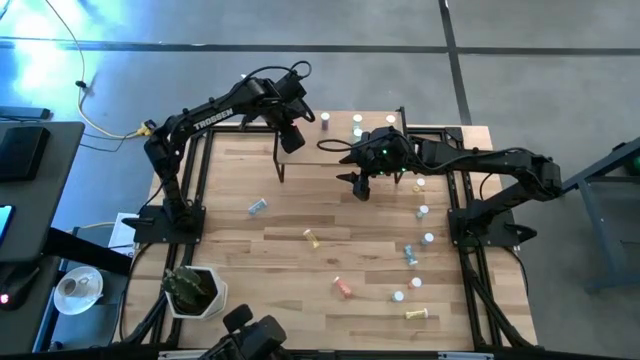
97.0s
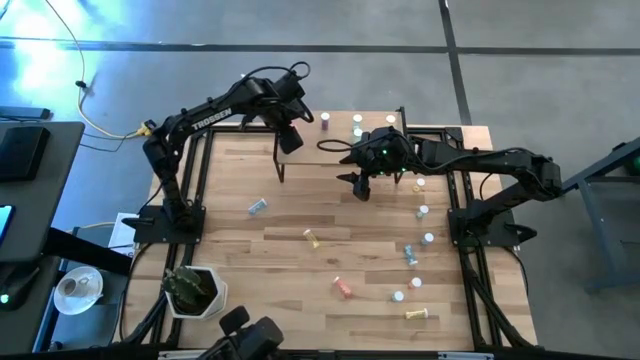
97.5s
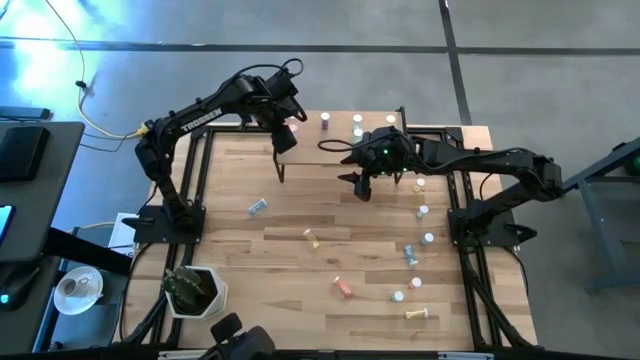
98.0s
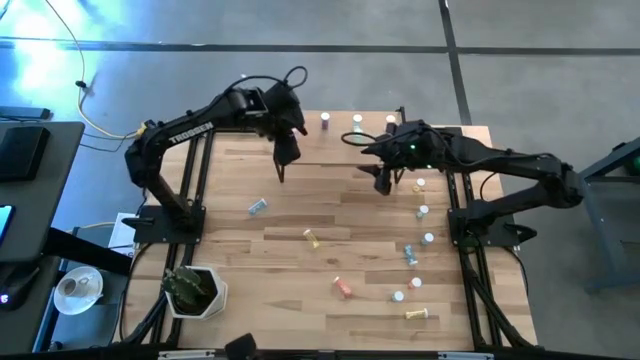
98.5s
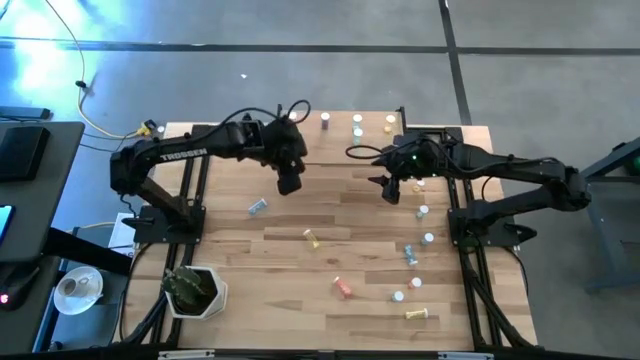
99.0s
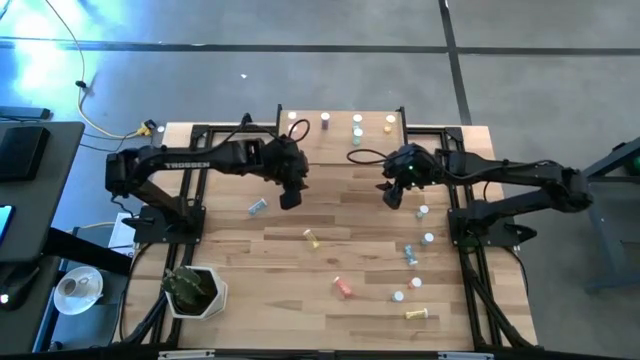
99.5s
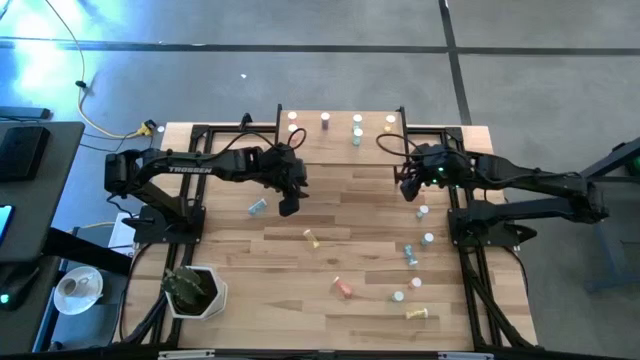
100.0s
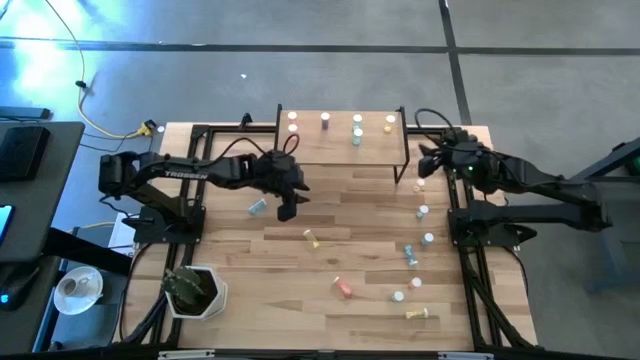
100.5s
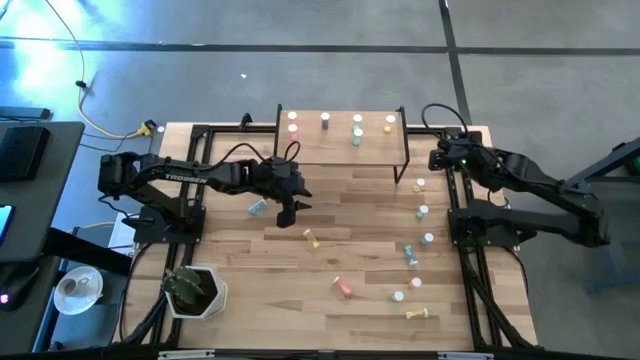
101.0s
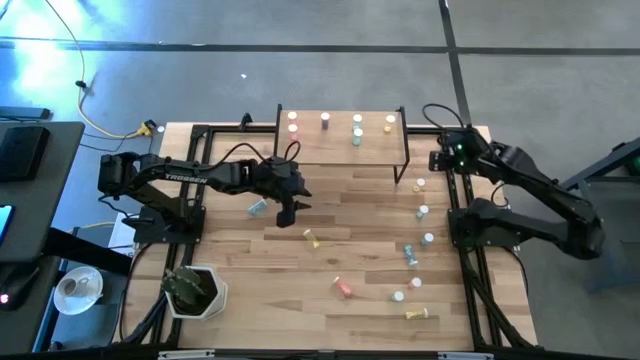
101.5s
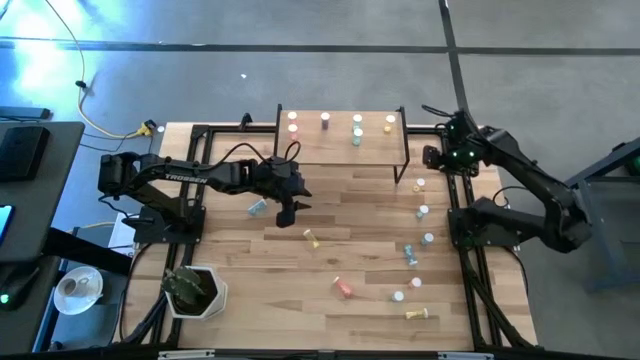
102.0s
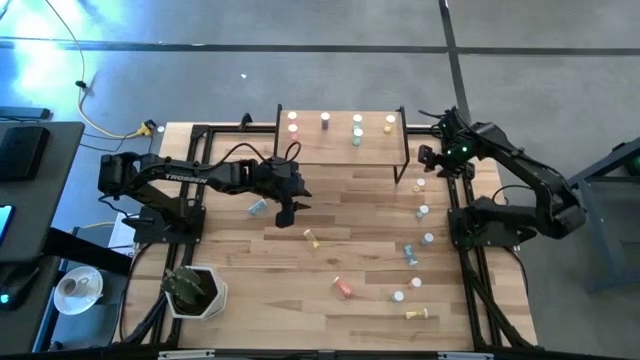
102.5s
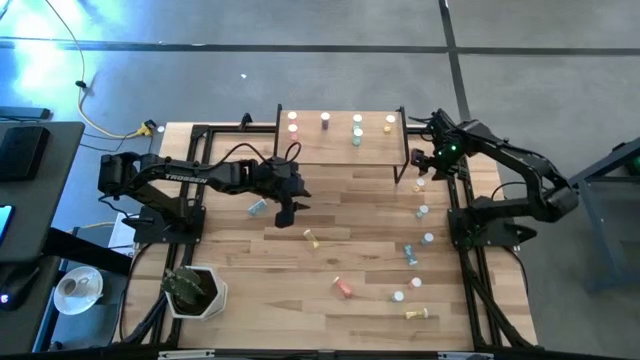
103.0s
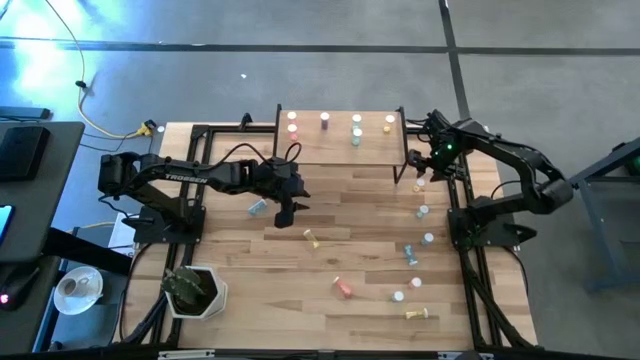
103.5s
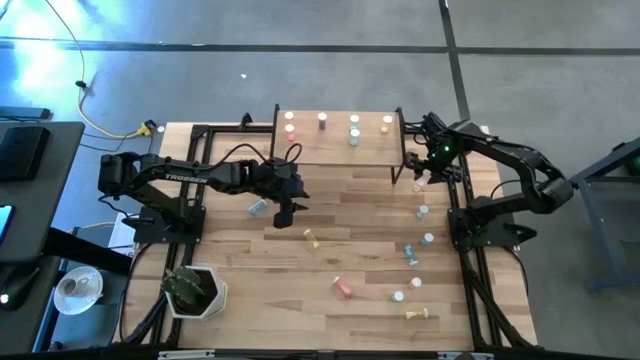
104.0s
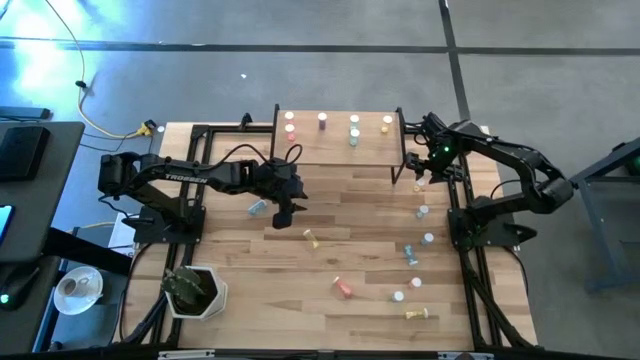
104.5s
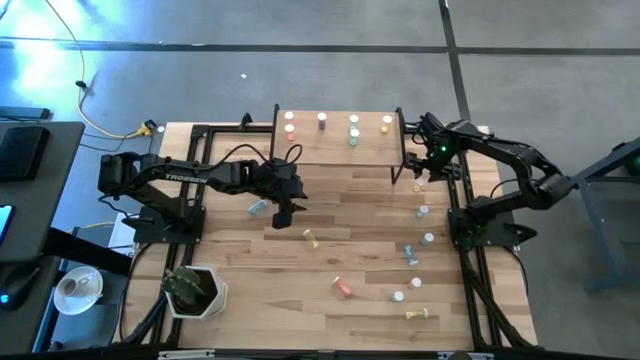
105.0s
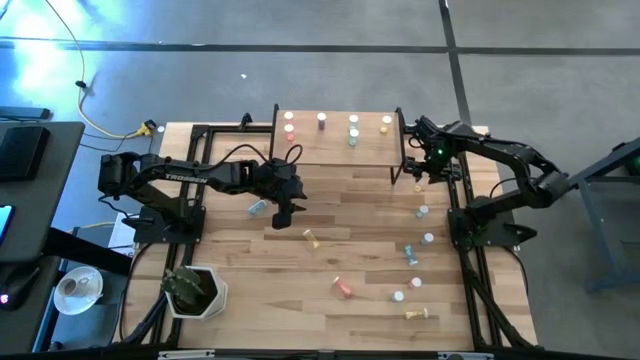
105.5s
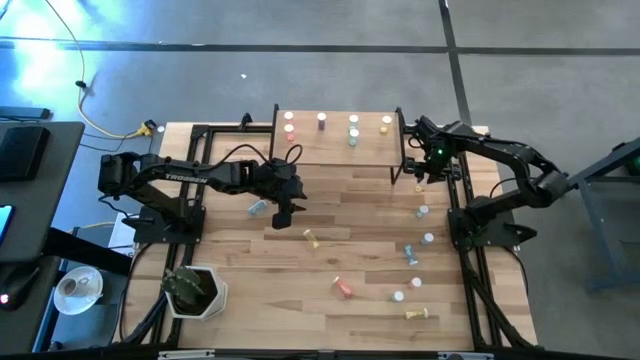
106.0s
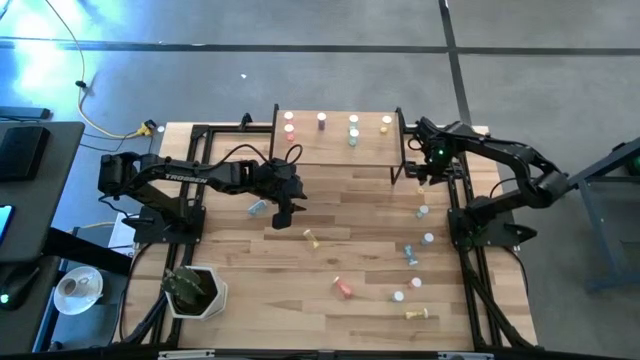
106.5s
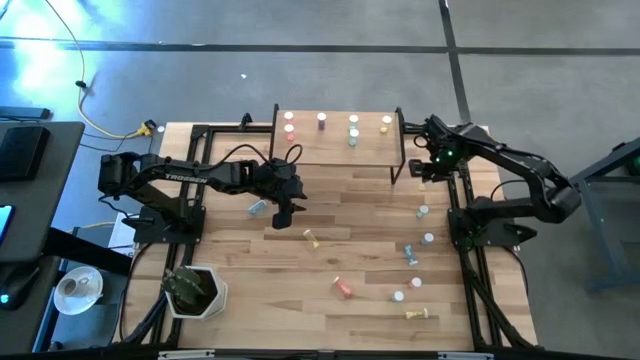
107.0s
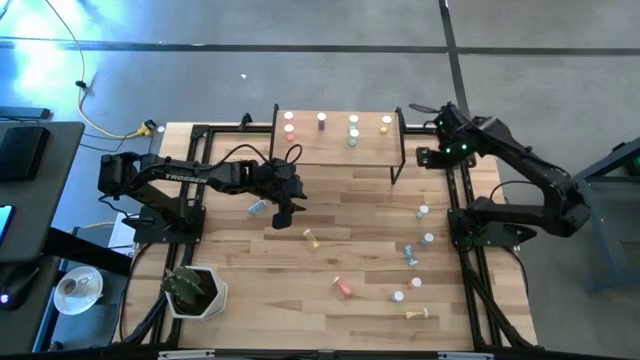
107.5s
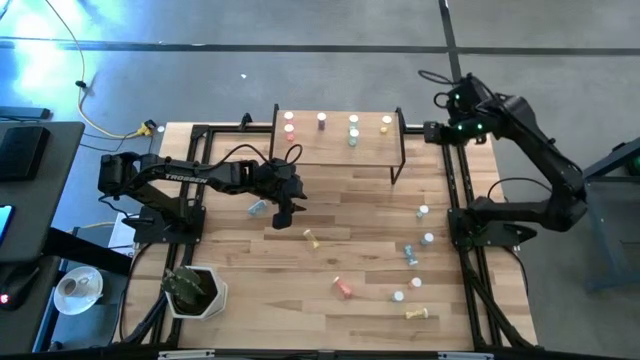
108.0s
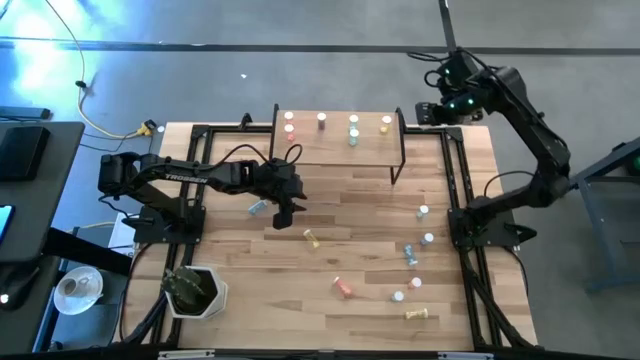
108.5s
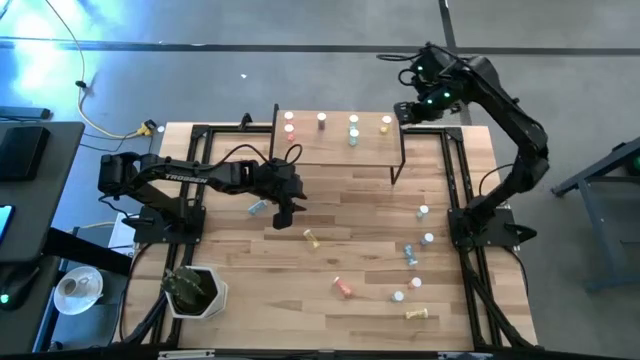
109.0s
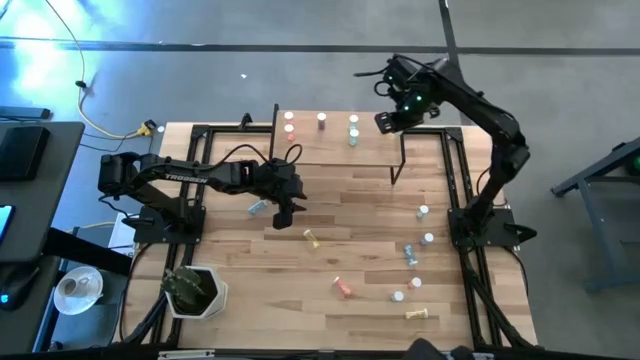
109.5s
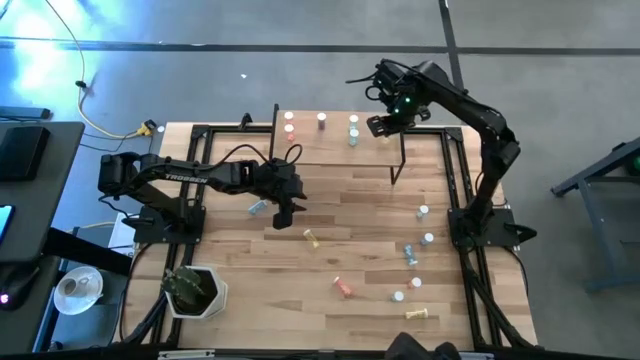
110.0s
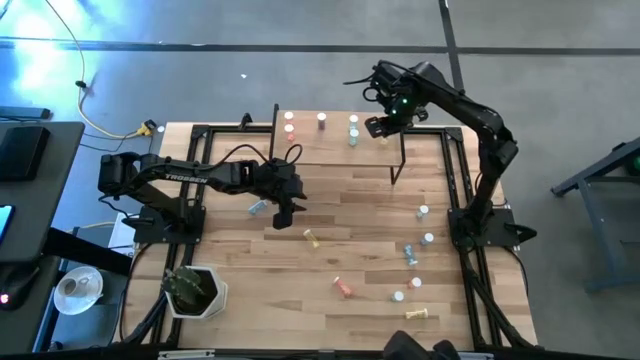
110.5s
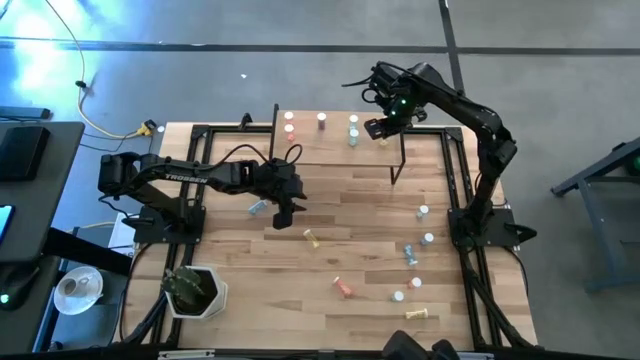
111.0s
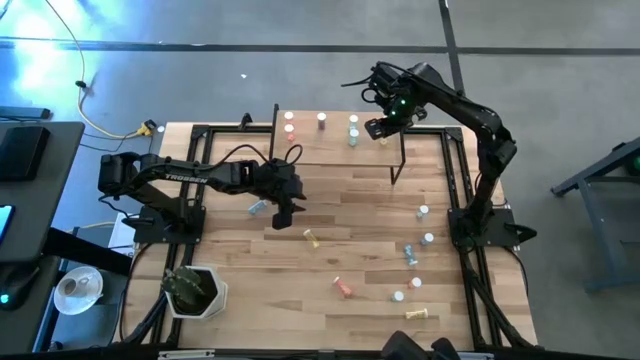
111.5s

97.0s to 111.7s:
Task: Pick and place medicine bottles onto shelf by color
Put the yellow pill bottle on the shelf aligned with the other yellow pill bottle

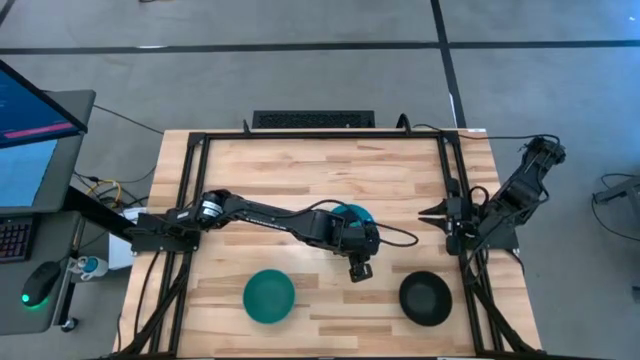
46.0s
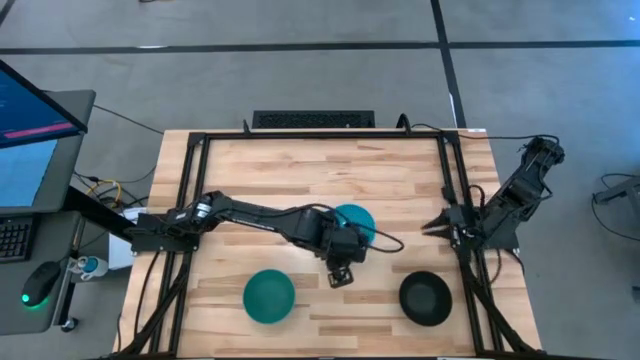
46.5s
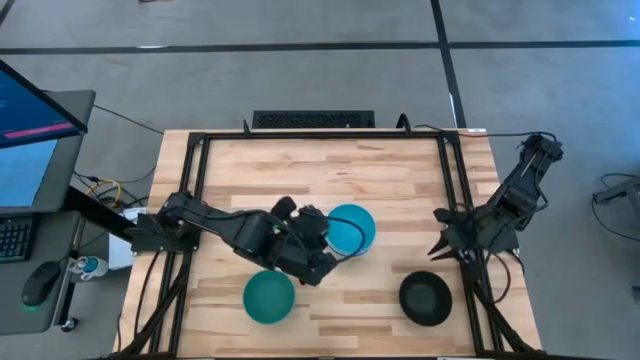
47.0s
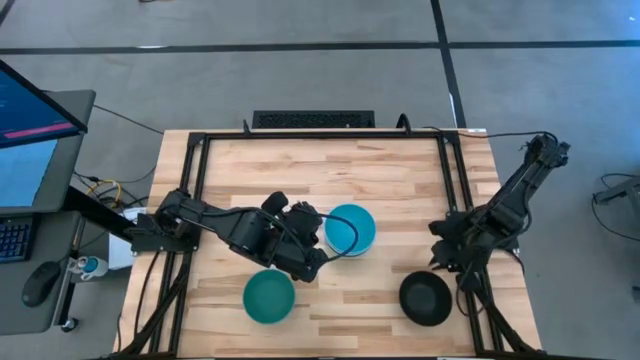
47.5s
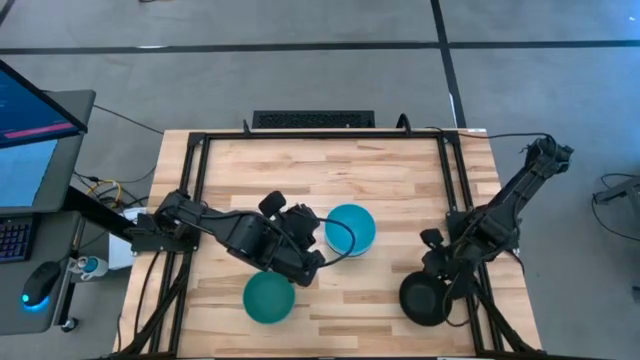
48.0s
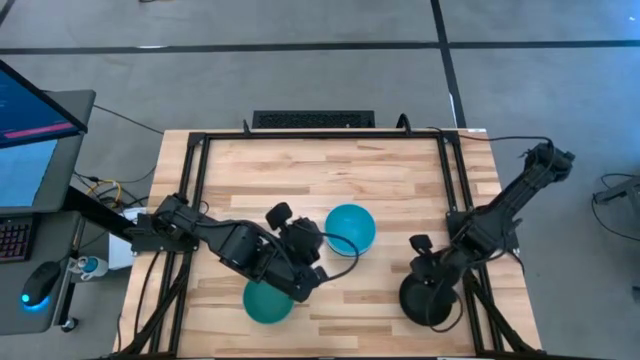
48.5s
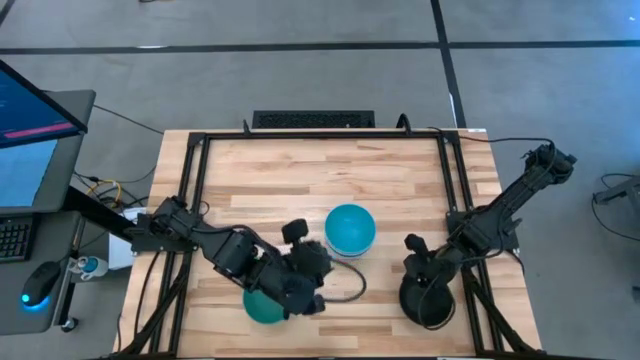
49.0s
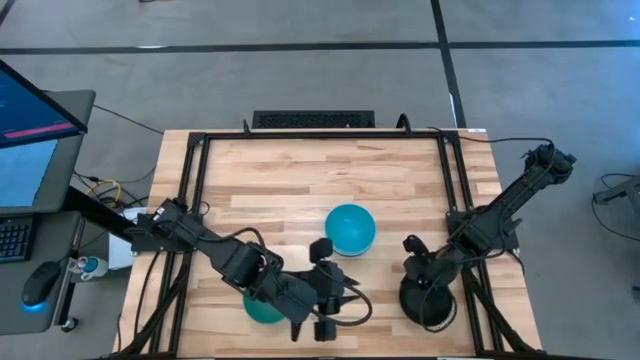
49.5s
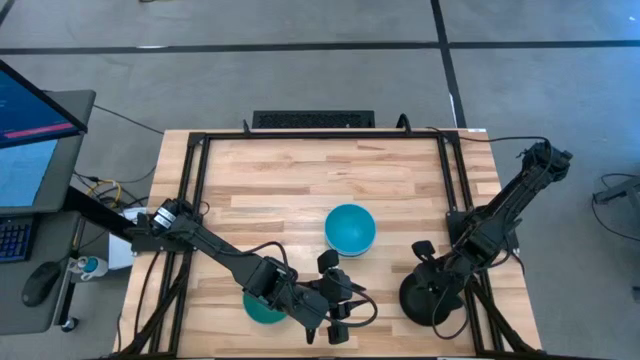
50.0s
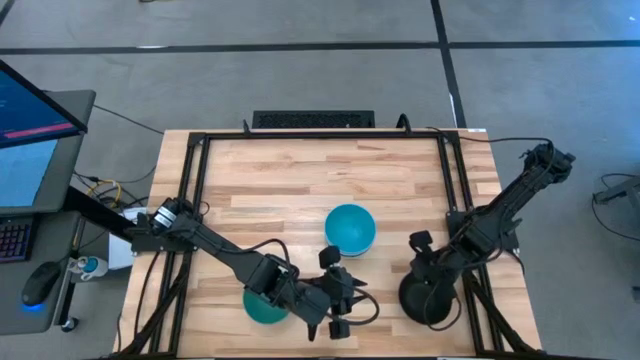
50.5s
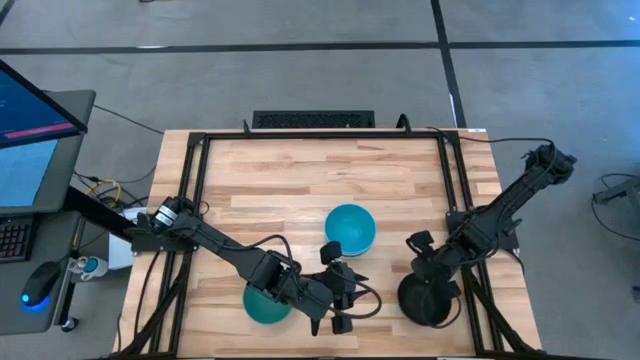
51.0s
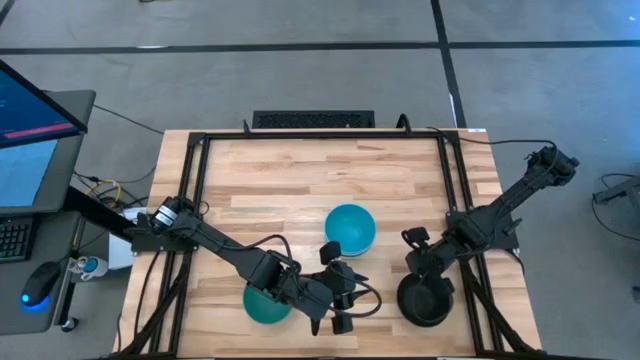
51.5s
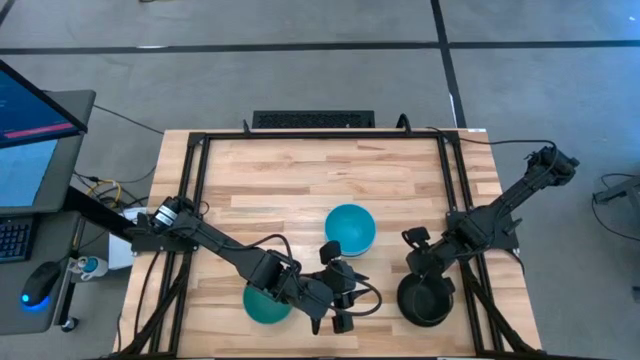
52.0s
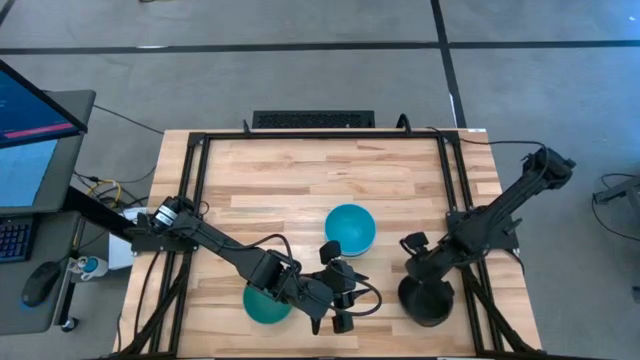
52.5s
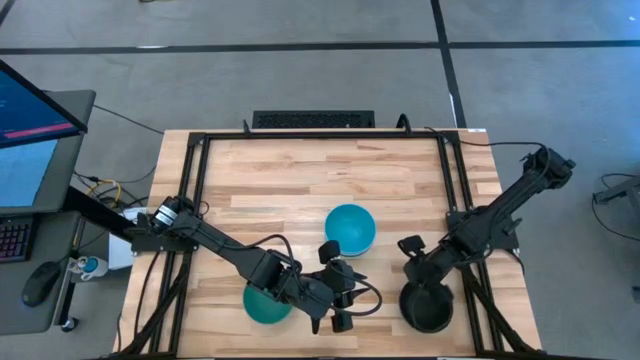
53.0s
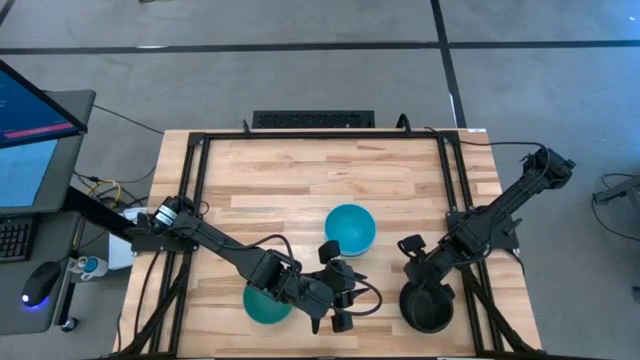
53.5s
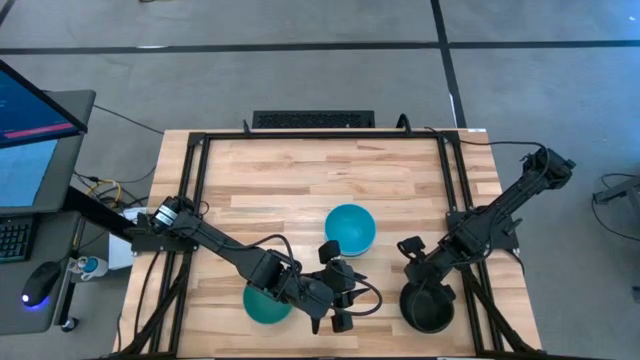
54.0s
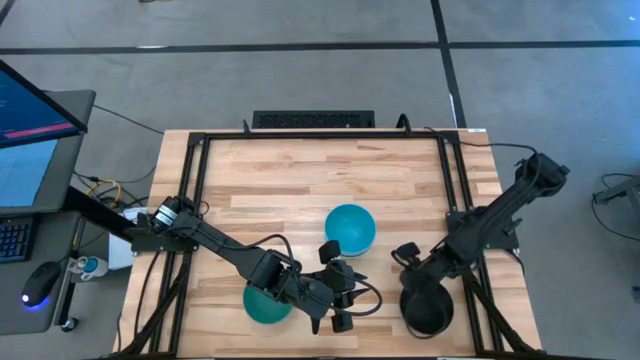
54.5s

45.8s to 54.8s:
Task: Nest bowls inside each other
Stack the black bowl on the blue bowl
